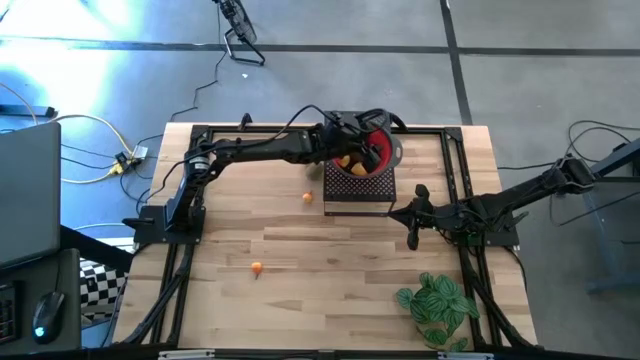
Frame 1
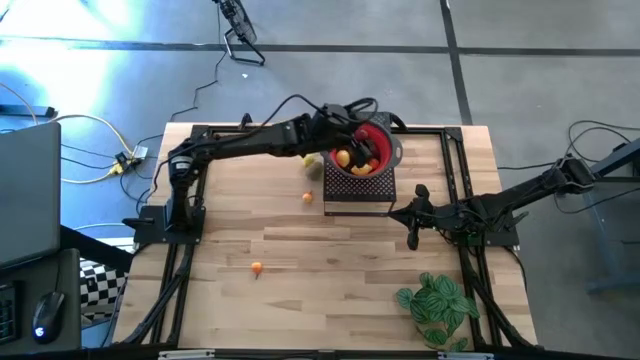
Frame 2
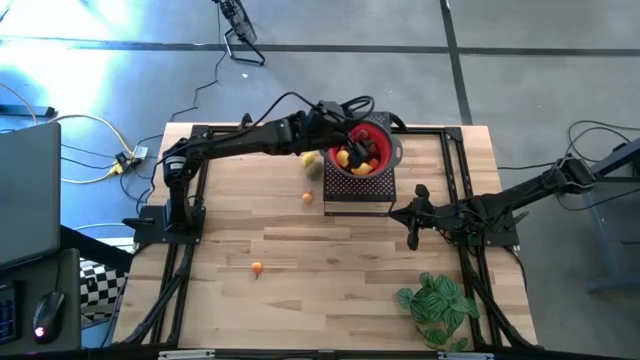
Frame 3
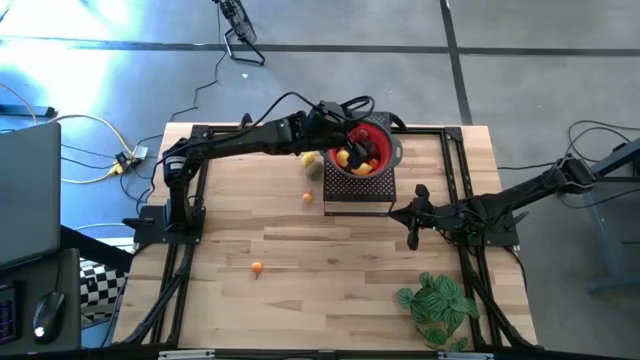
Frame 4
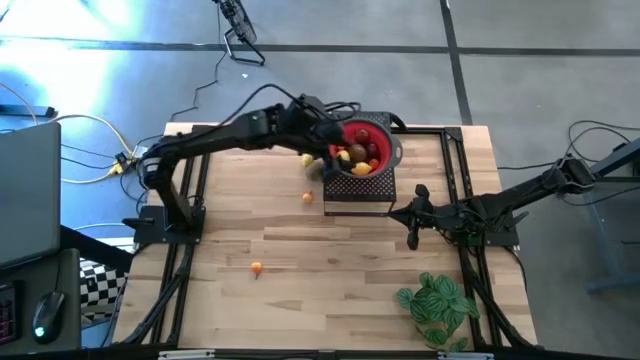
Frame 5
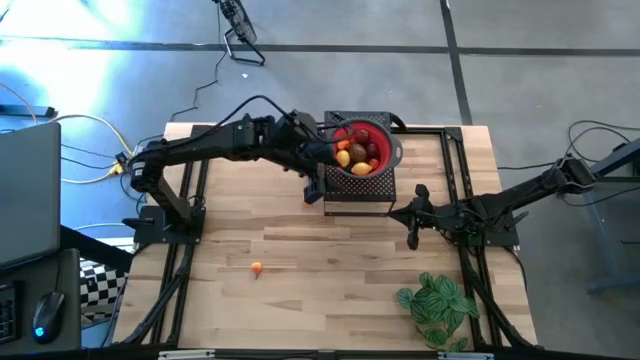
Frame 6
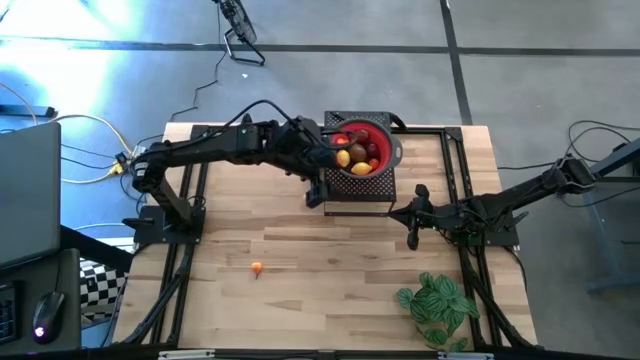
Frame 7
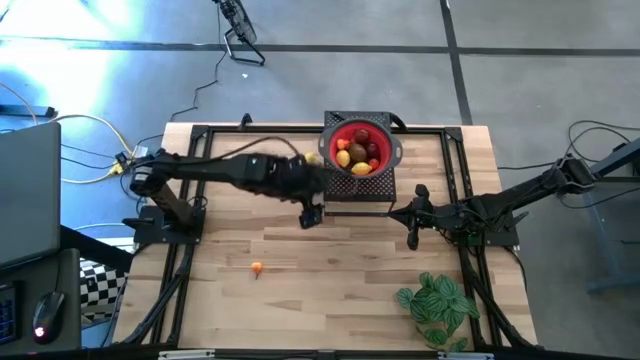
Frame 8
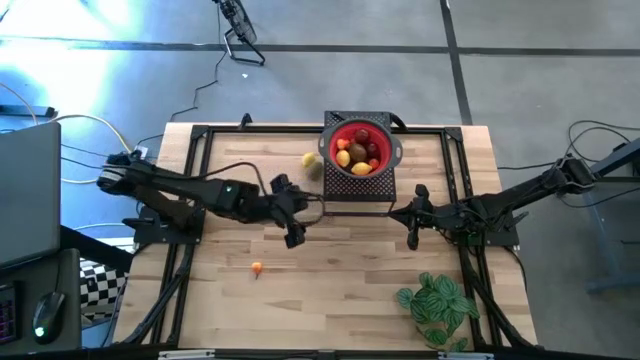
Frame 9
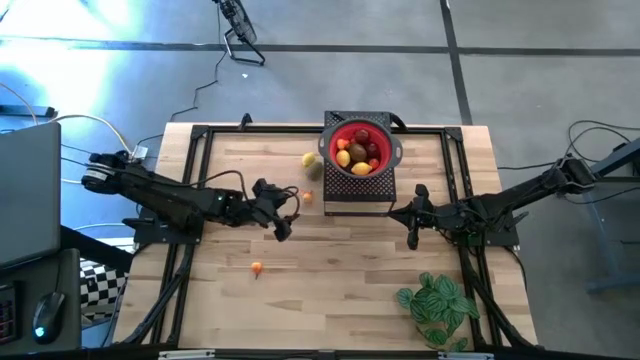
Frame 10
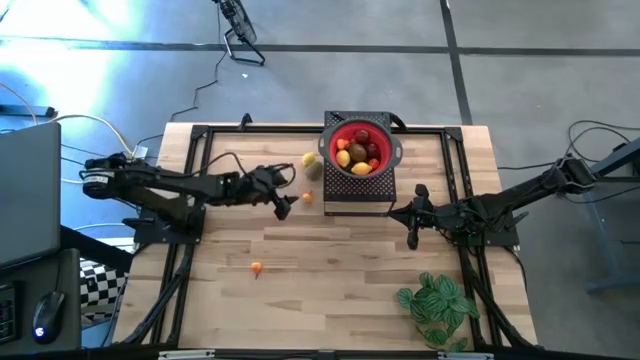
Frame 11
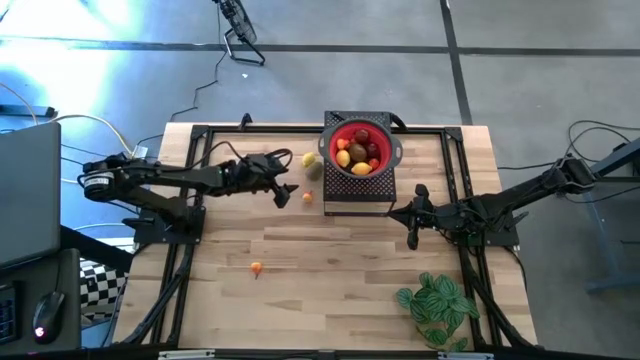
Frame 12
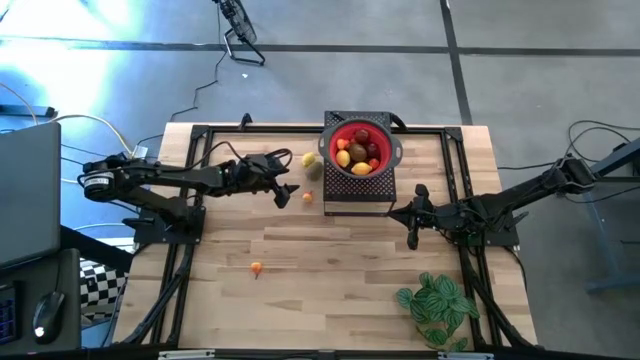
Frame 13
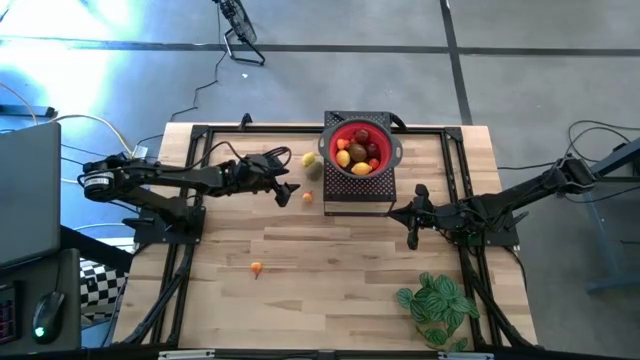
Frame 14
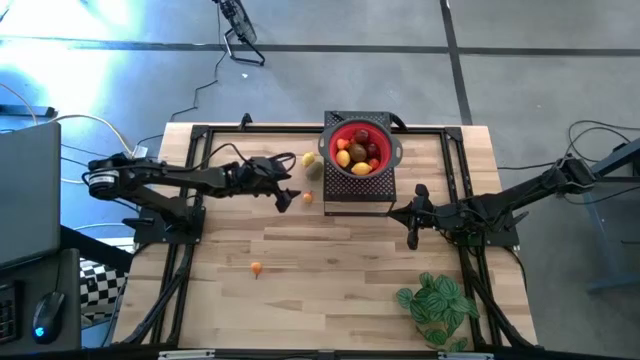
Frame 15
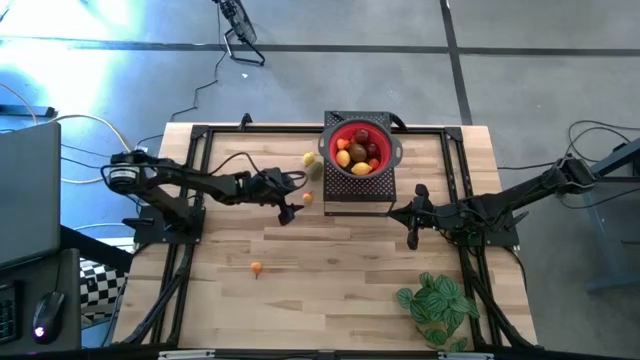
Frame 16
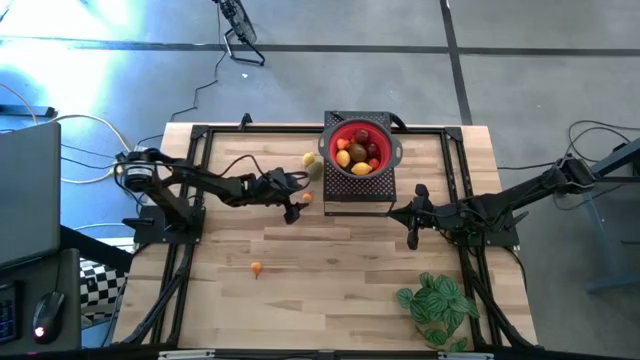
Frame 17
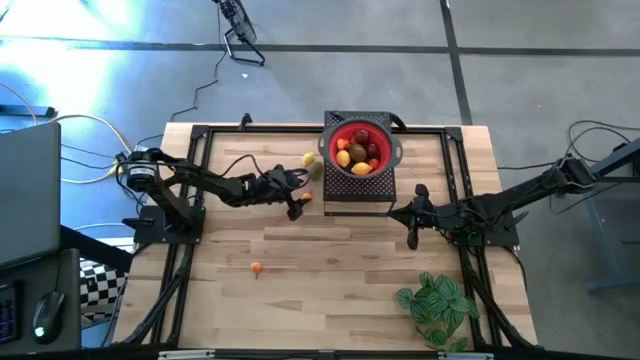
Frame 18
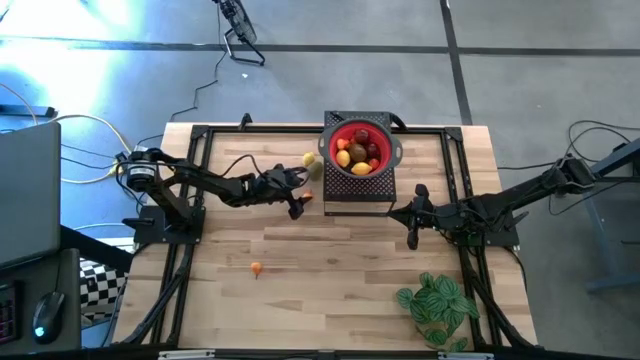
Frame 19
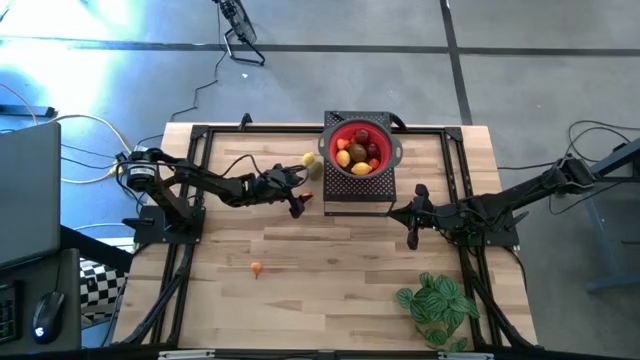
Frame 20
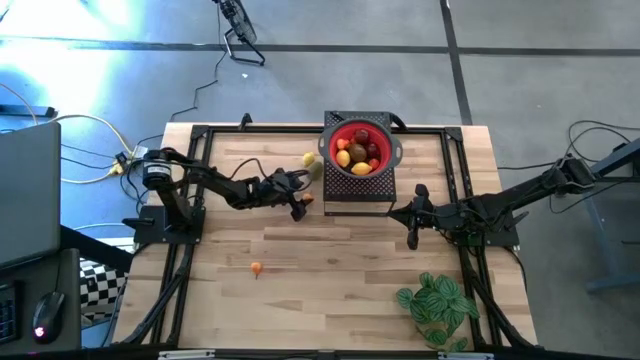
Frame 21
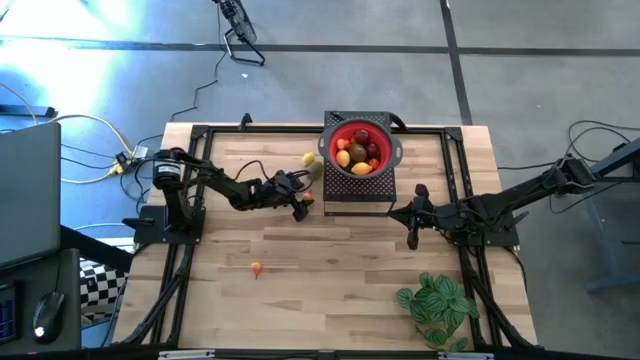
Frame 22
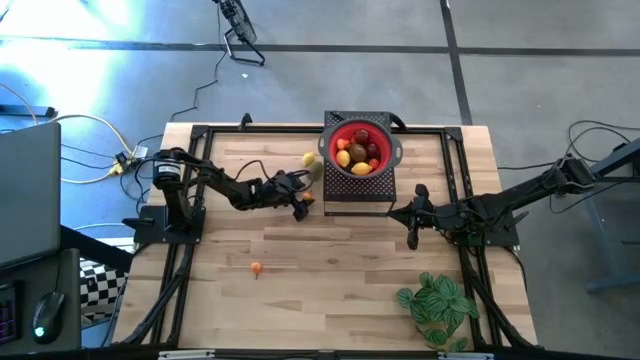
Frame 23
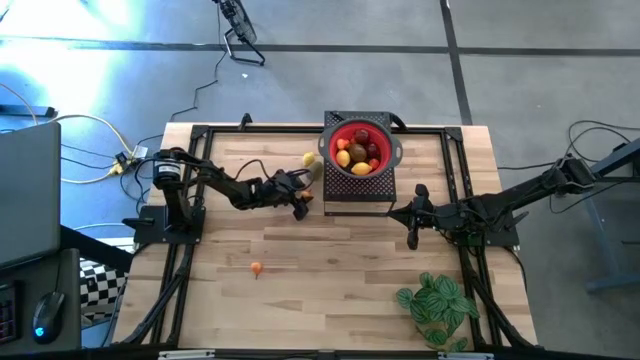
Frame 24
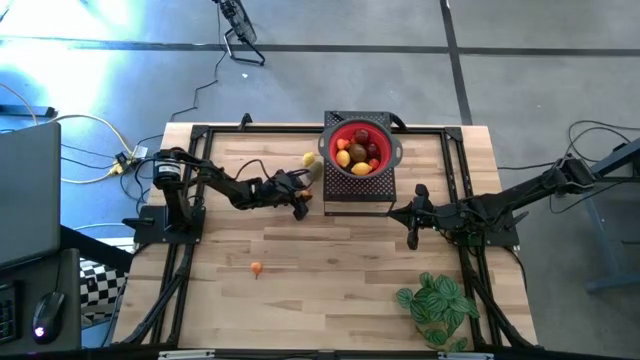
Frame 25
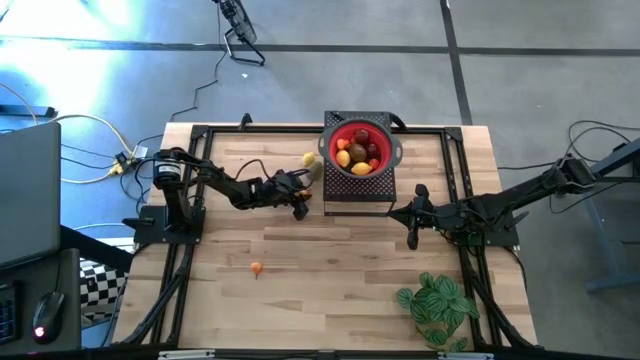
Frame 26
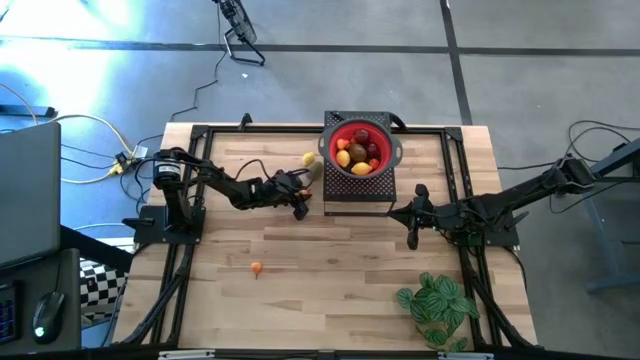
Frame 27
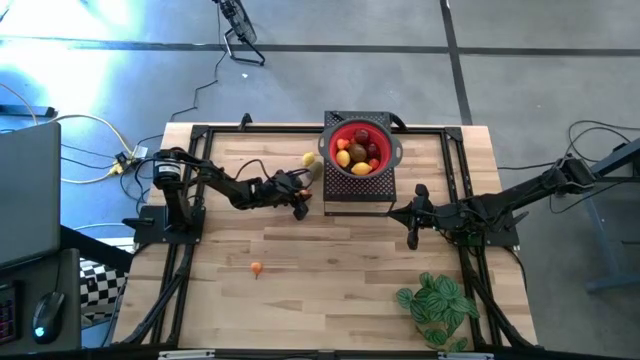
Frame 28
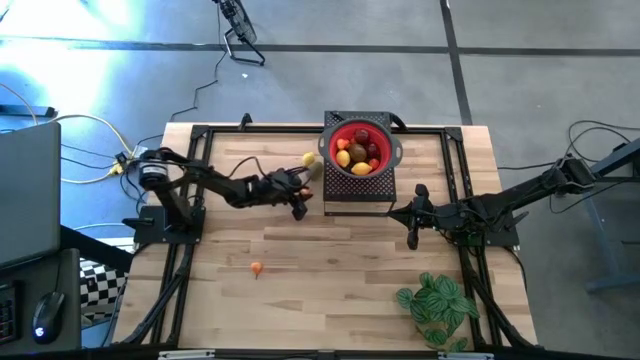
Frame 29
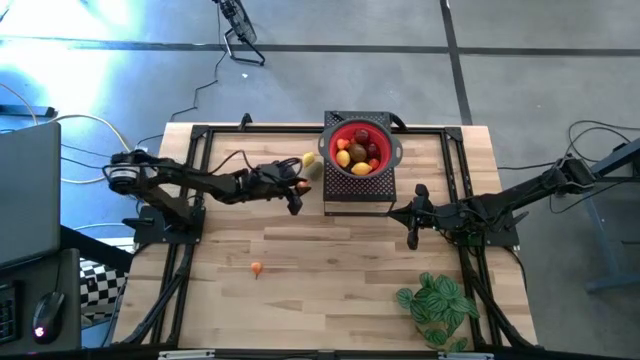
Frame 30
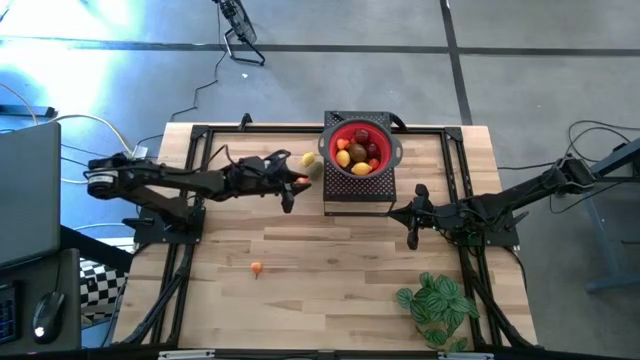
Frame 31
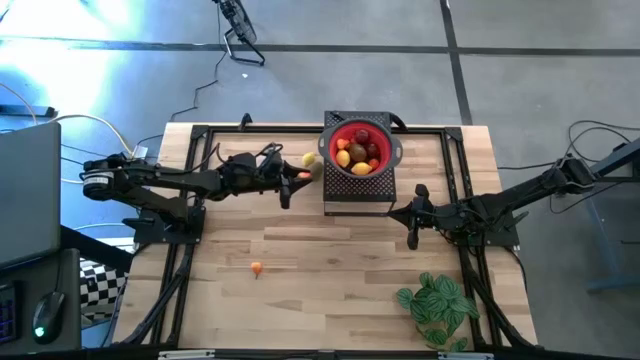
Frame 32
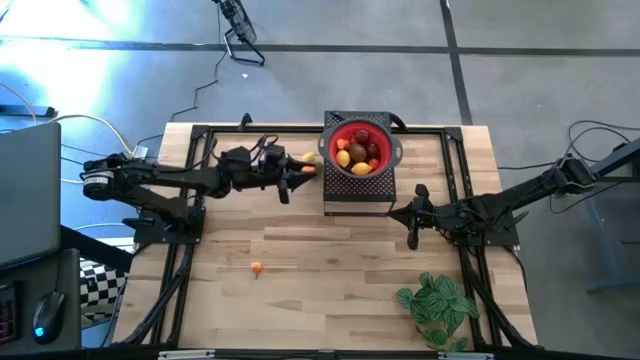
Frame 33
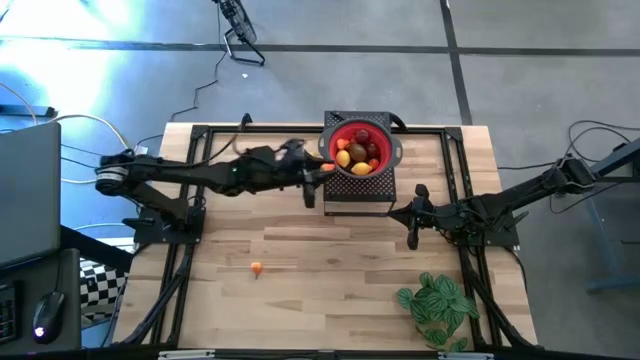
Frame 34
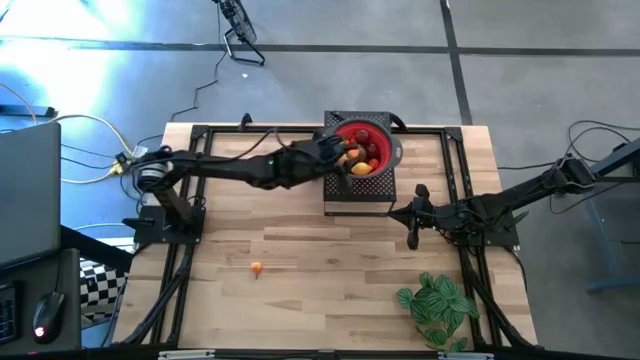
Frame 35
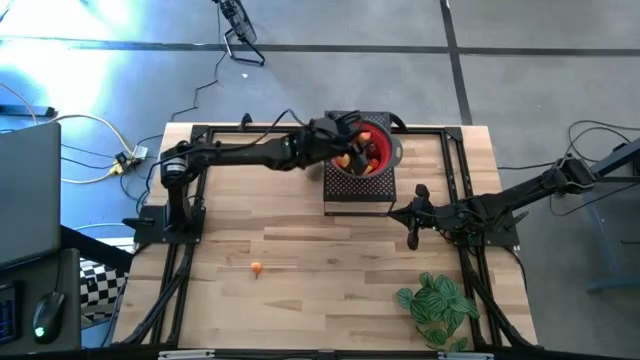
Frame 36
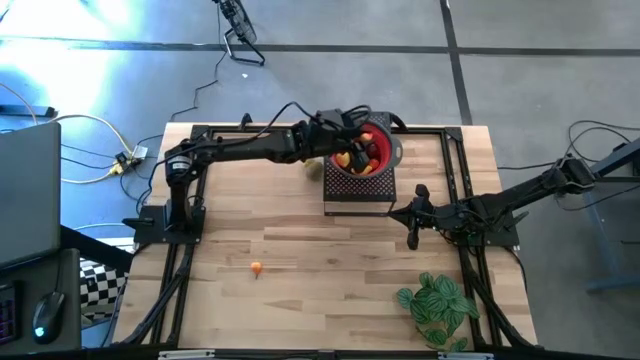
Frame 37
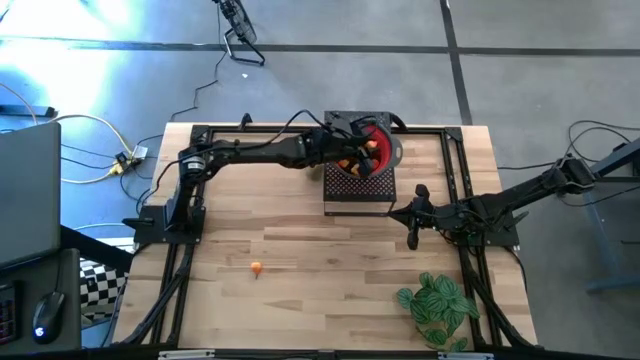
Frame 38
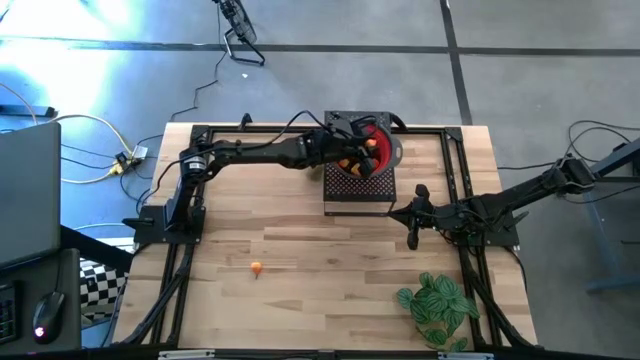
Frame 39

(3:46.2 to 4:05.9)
Task: Pick & Place Fruit
Put the orange pear into the red strainer bowl on the shelf

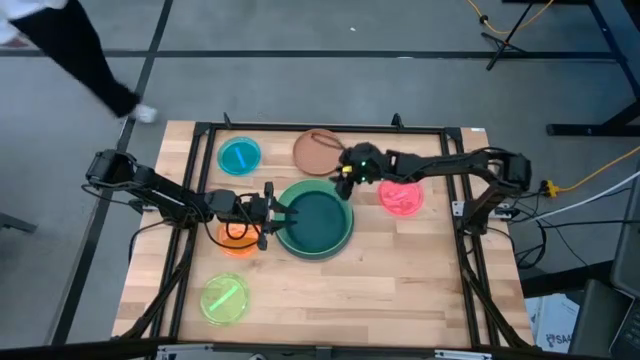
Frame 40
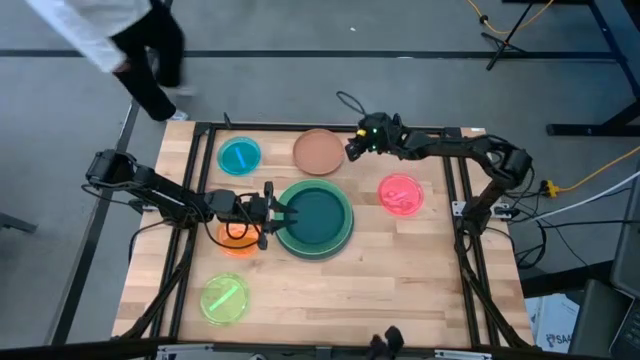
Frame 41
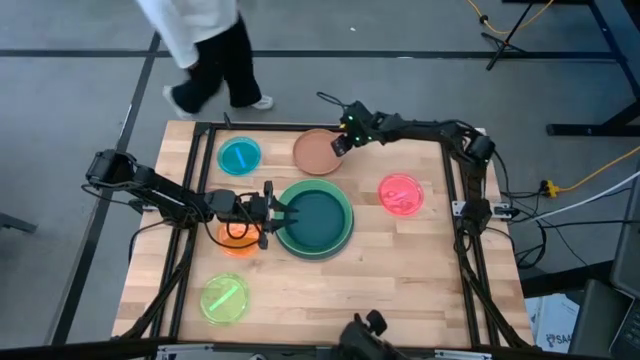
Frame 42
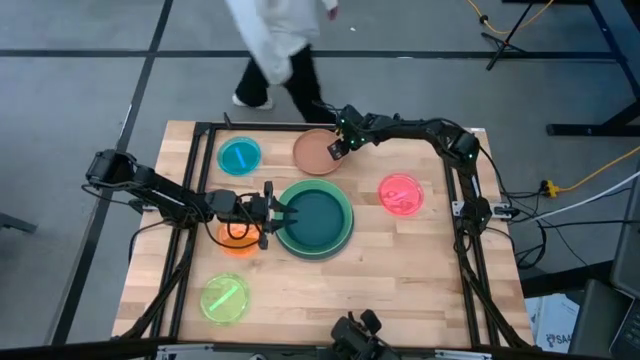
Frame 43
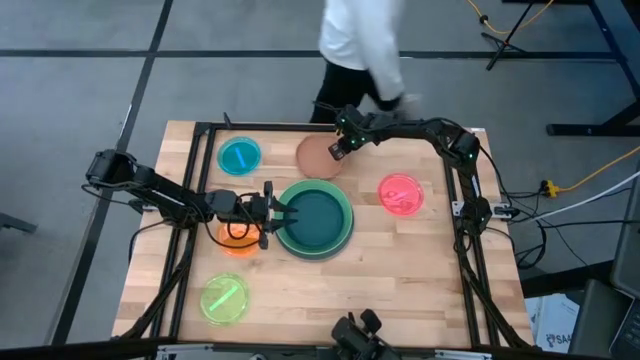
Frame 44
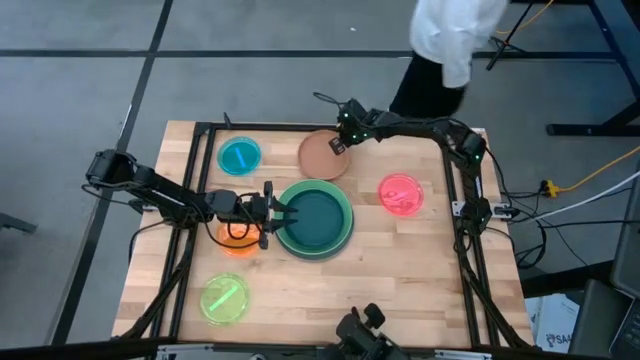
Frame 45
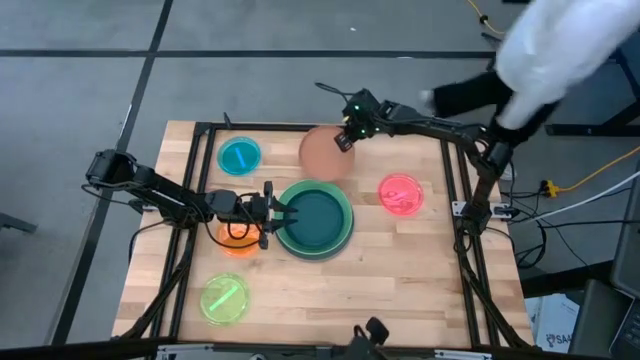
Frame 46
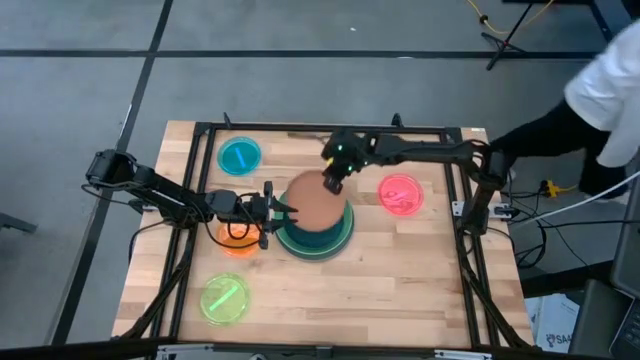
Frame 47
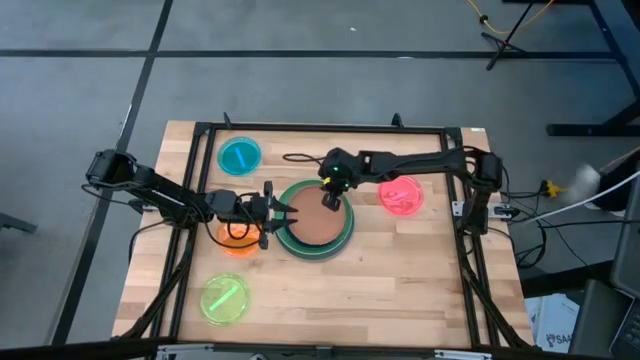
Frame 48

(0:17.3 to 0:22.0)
Task: Stack plastic plates
Stack the brown plate on top of the dark green plate
